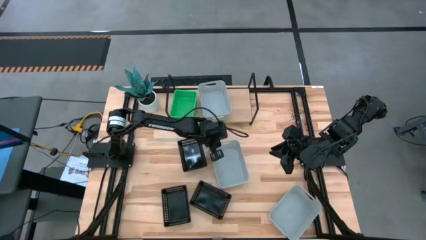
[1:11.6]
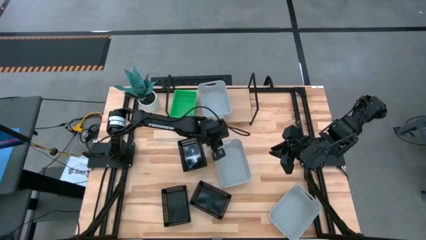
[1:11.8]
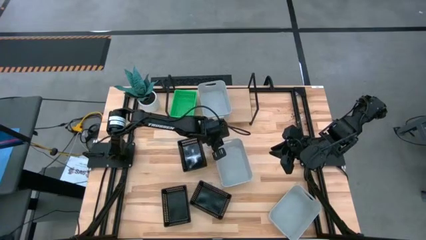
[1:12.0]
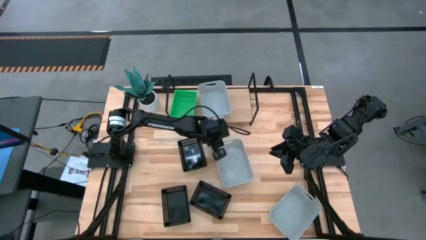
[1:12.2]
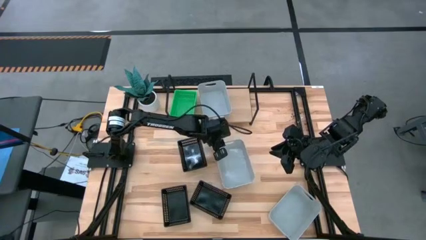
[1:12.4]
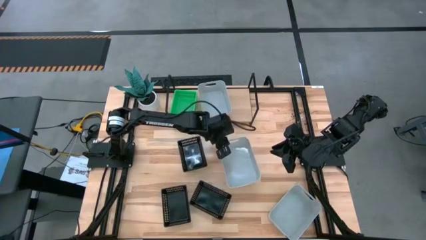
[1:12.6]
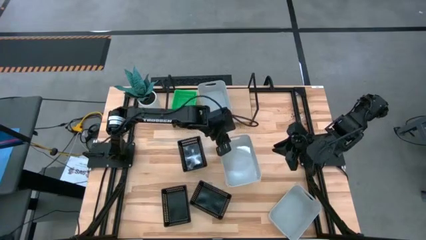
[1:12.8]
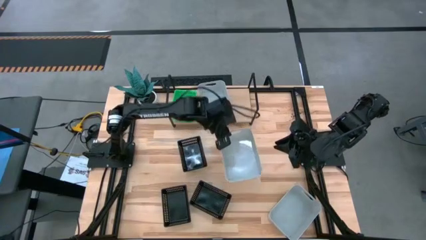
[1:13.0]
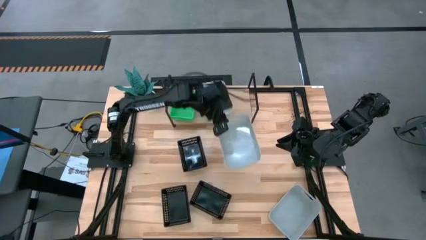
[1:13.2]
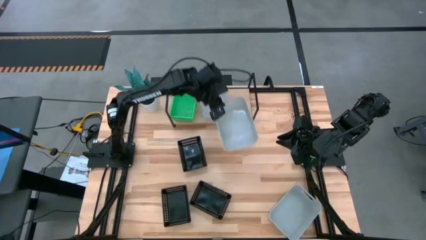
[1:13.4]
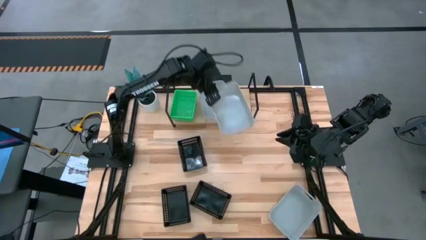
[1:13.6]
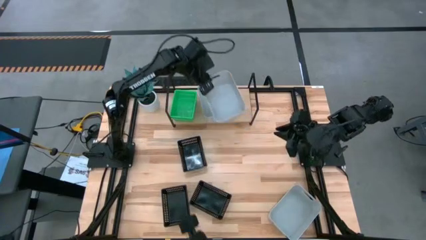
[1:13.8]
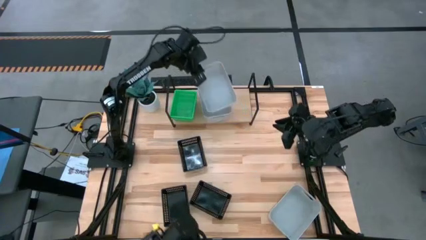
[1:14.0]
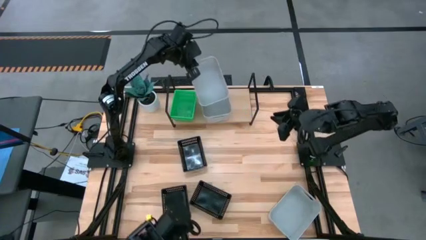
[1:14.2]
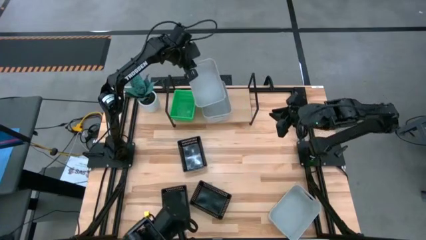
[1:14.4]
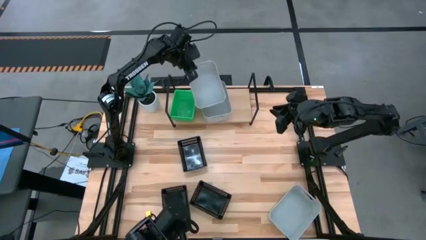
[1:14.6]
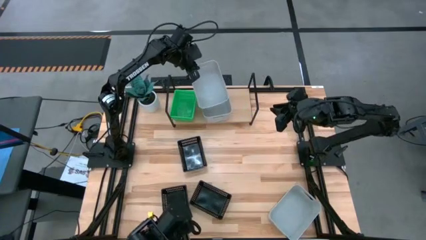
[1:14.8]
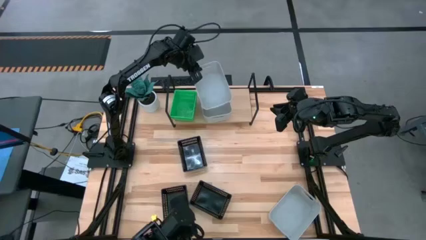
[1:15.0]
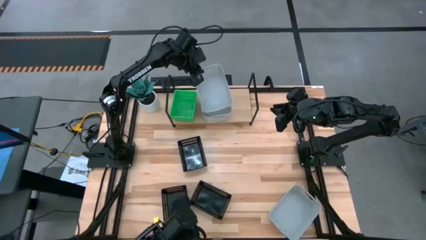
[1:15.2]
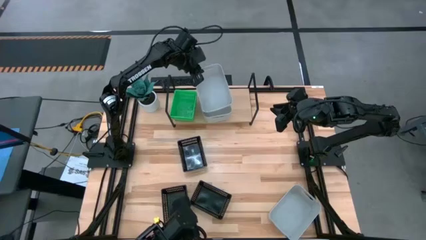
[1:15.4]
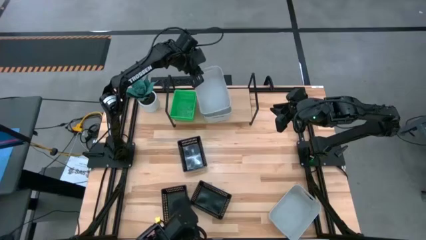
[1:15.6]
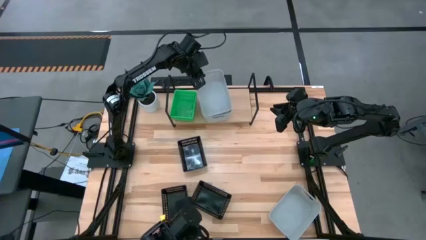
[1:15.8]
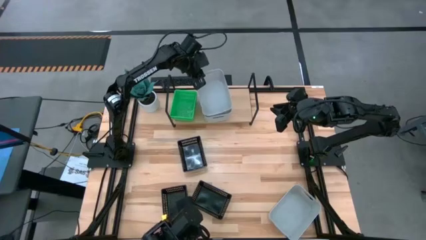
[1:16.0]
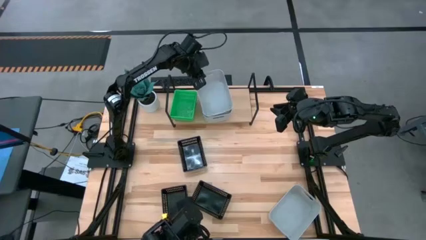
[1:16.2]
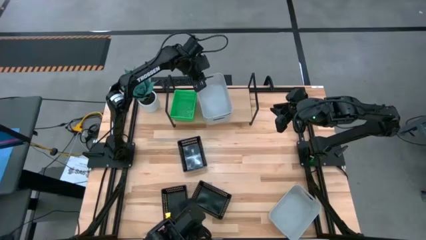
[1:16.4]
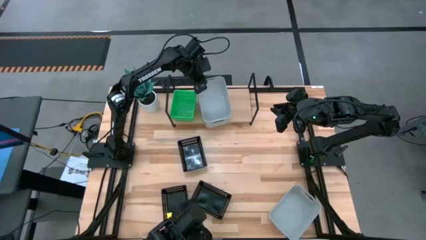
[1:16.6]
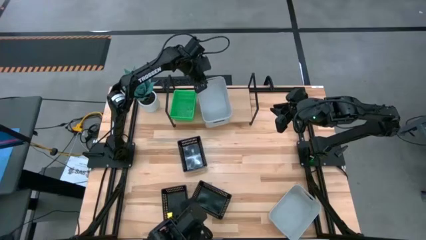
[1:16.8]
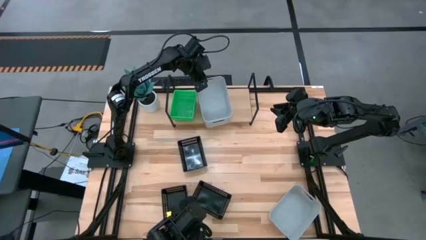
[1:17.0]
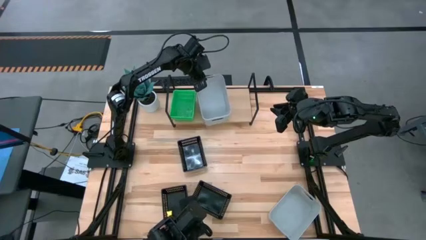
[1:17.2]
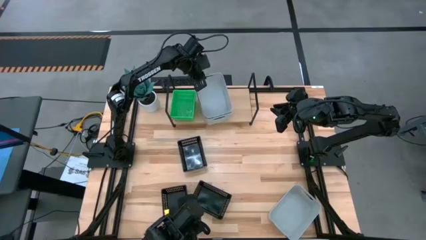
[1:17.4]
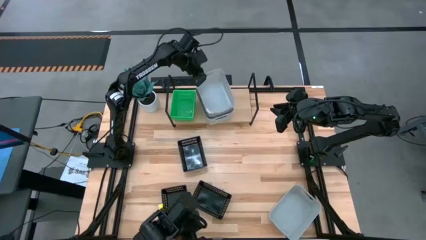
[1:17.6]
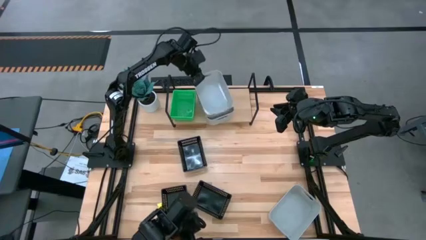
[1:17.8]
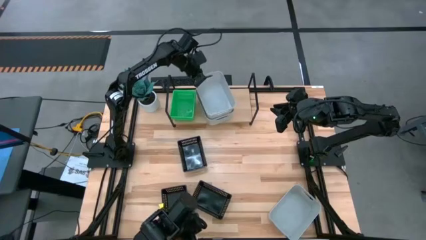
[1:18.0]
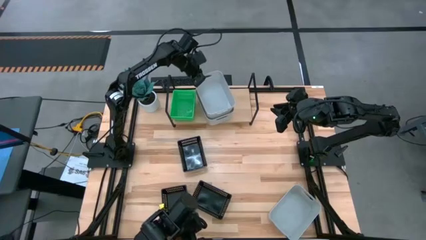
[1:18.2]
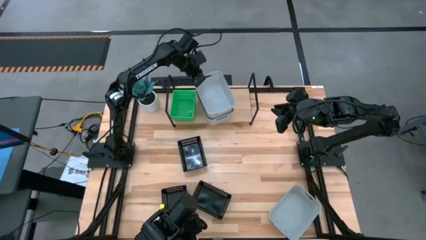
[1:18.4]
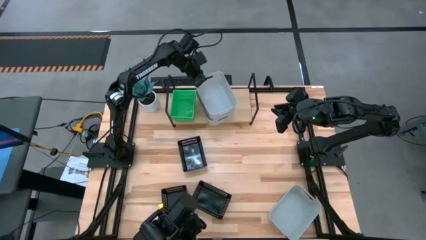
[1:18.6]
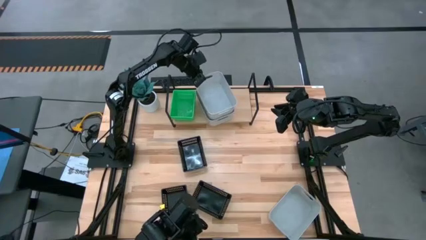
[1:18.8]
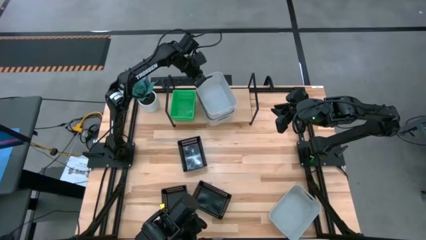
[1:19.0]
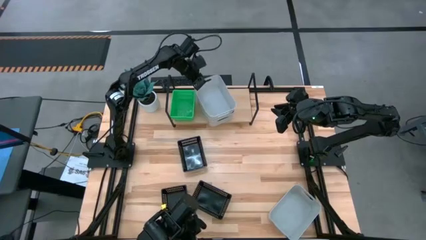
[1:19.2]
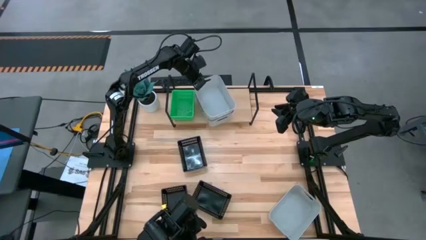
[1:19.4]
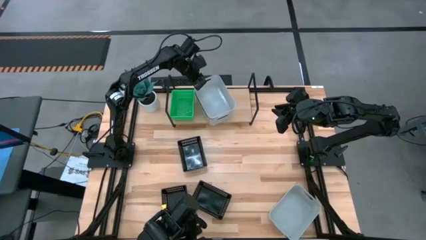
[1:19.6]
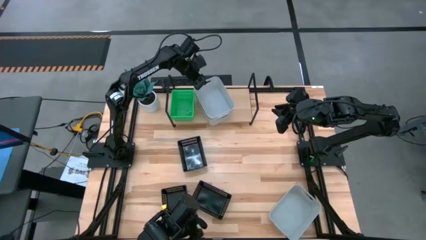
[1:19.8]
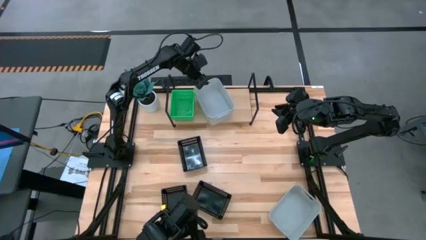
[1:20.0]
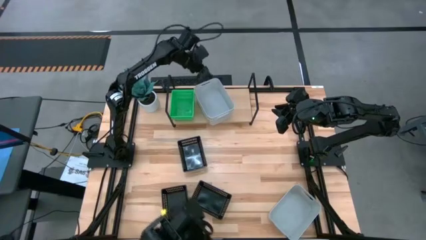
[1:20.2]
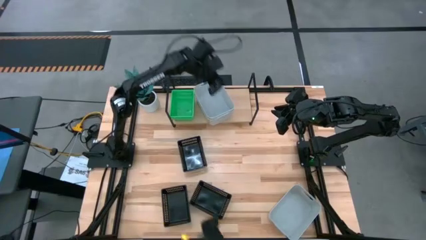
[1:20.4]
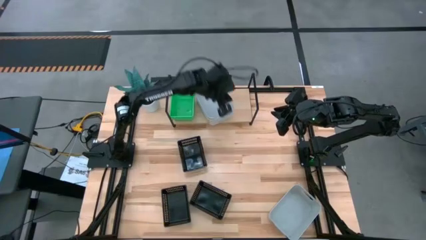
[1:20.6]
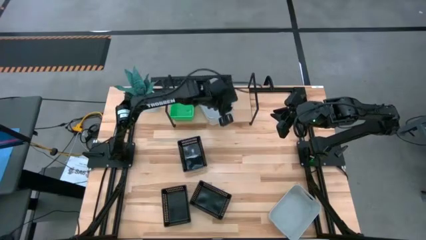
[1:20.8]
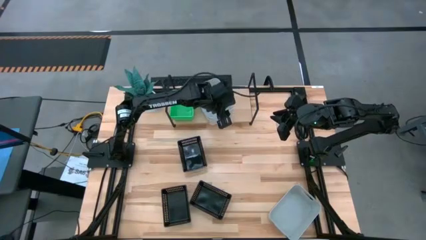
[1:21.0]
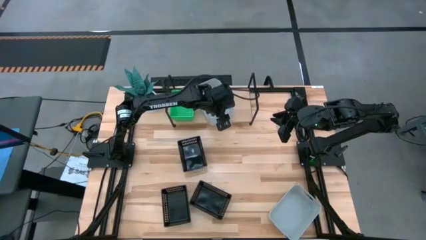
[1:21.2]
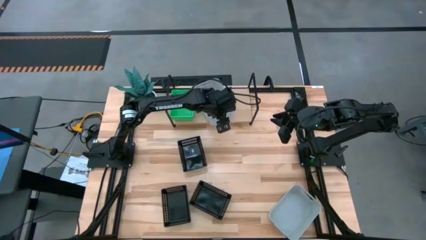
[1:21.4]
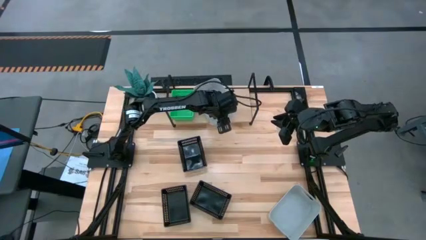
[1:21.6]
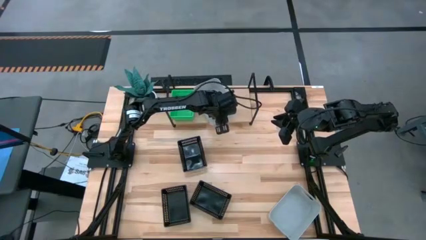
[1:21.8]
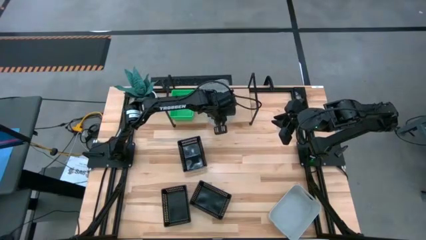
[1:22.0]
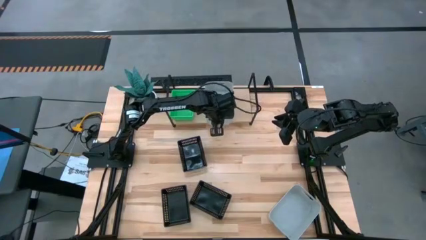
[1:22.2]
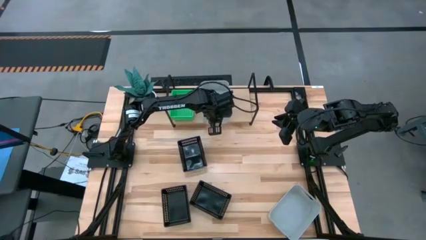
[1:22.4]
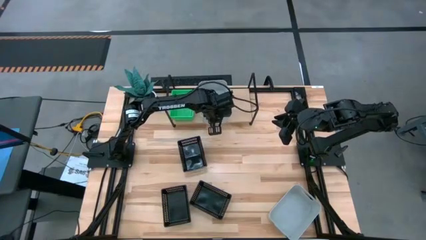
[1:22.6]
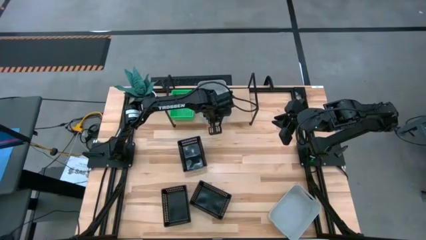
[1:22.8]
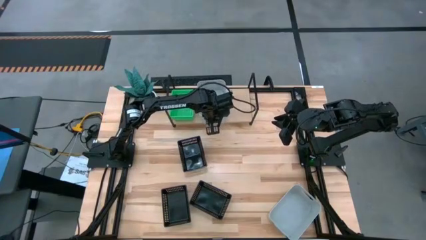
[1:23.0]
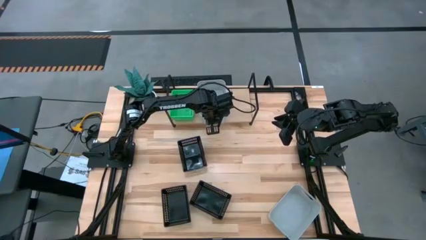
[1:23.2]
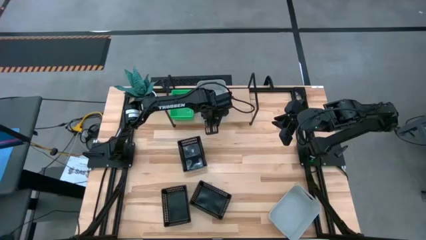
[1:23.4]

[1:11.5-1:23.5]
Task: Stack baskets on shelf by color
Stack the top gray bin on top of the gray bin on the shelf

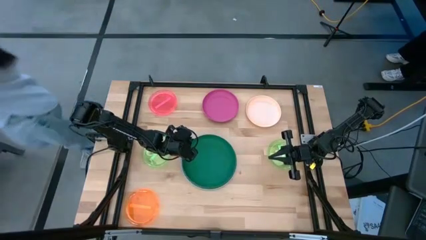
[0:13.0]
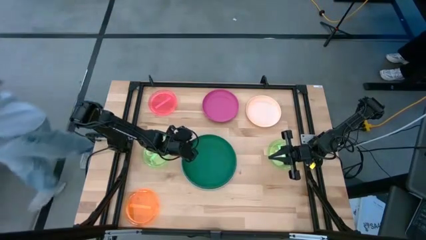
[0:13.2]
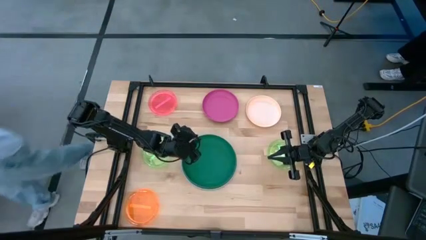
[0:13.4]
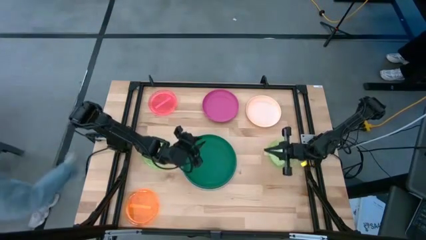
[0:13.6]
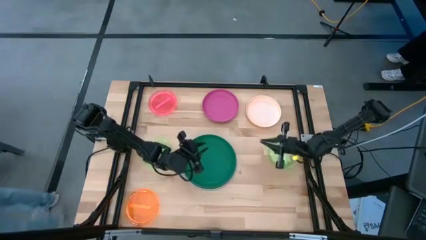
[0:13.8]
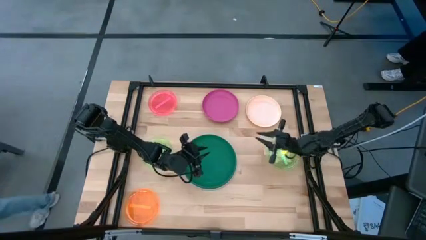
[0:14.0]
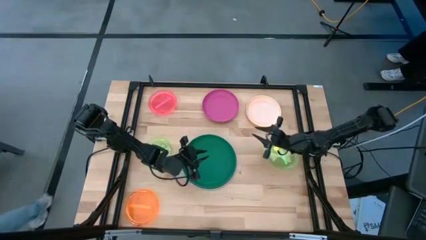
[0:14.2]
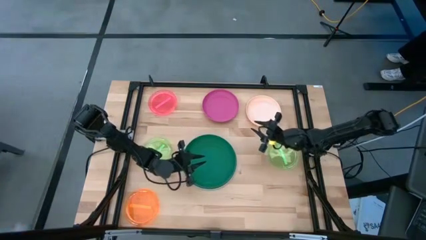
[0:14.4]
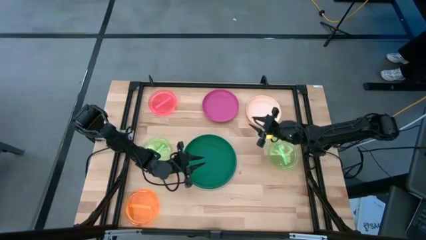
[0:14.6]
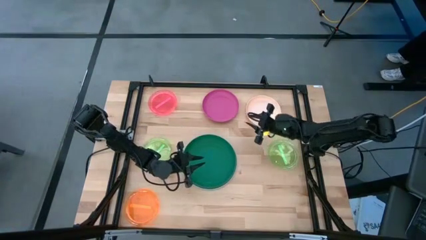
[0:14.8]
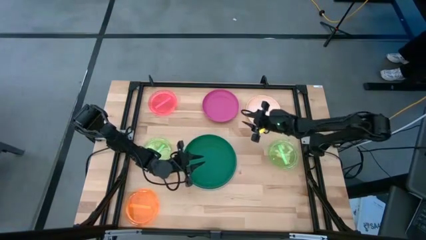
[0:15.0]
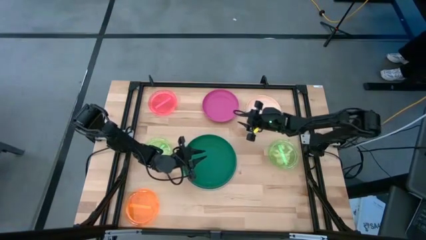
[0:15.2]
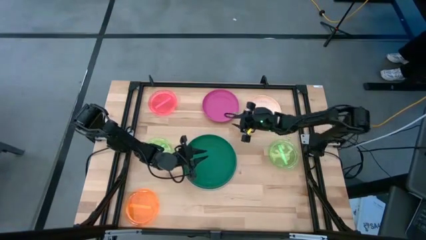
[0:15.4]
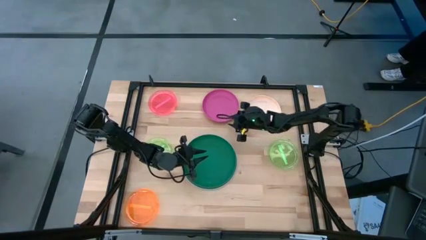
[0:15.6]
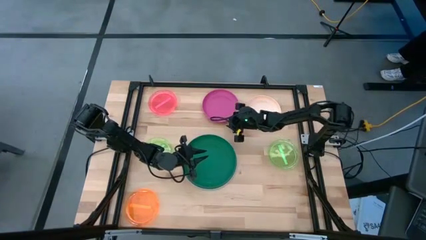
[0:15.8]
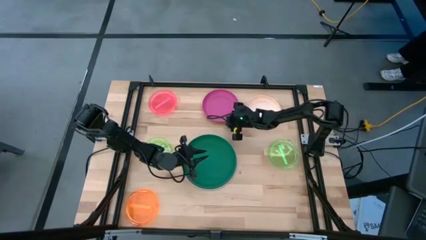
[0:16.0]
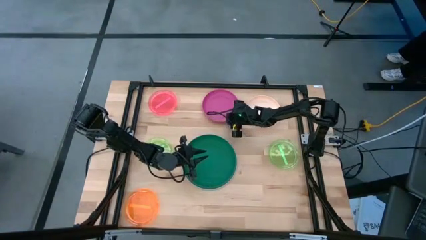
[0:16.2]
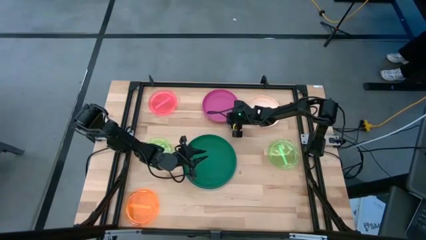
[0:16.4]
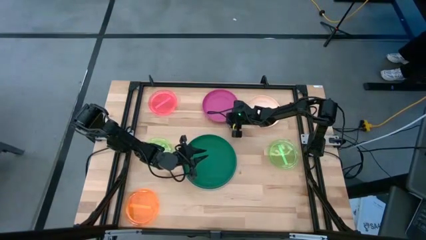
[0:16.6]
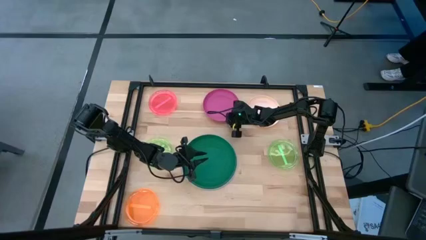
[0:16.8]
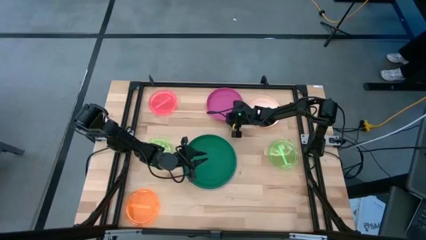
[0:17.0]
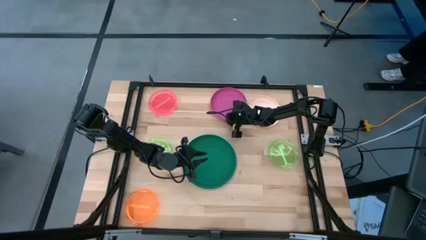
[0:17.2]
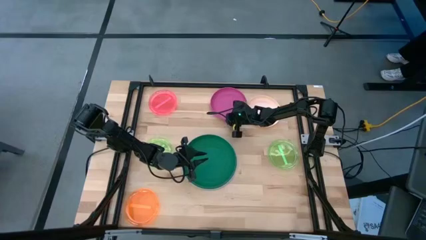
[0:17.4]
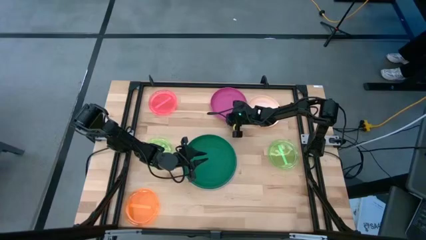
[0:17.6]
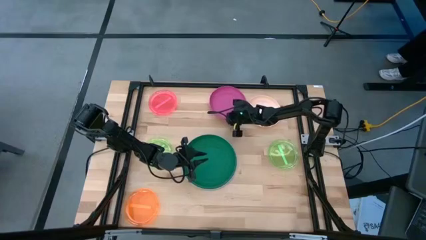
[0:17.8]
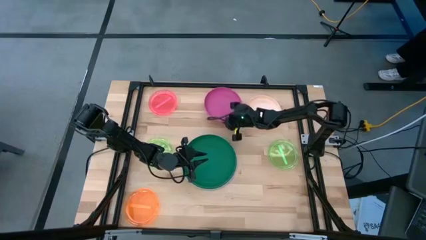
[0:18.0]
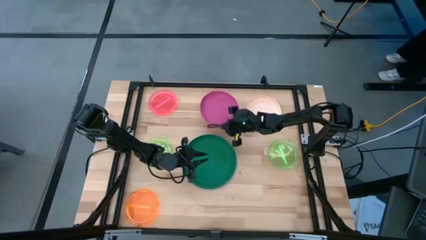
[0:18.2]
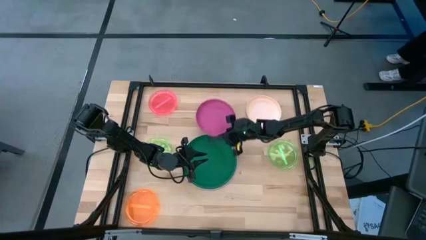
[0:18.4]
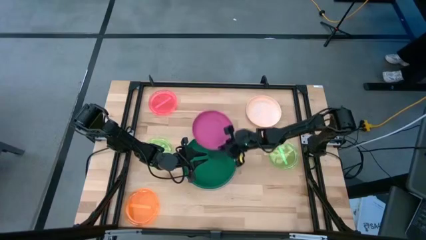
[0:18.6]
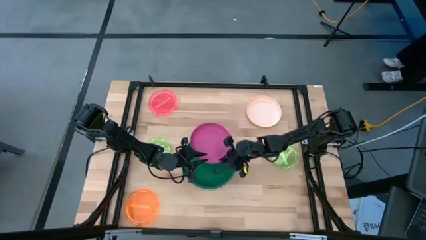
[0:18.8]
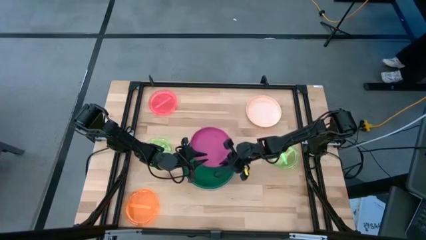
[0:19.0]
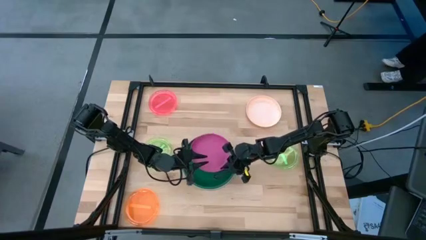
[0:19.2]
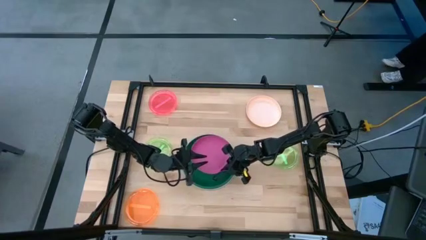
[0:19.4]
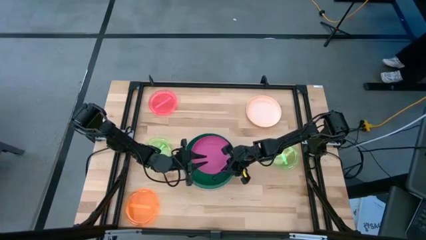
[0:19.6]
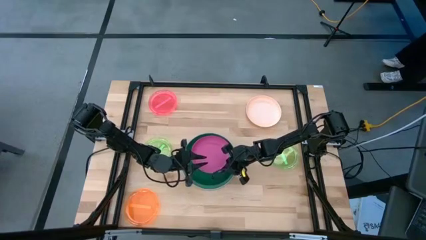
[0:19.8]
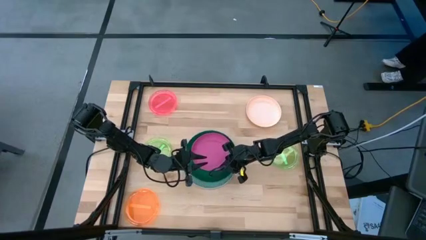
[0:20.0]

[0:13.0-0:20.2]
Task: Stack plastic plates
Stack the pink plate on top of the dark green plate
